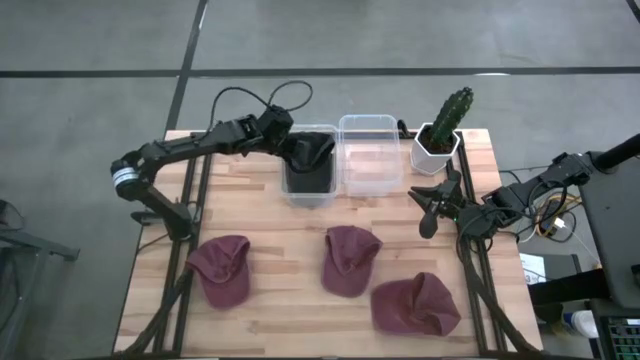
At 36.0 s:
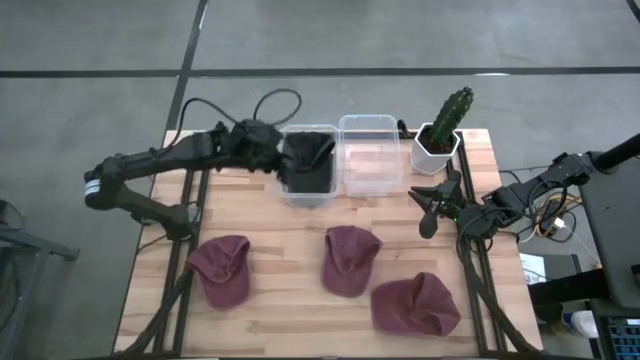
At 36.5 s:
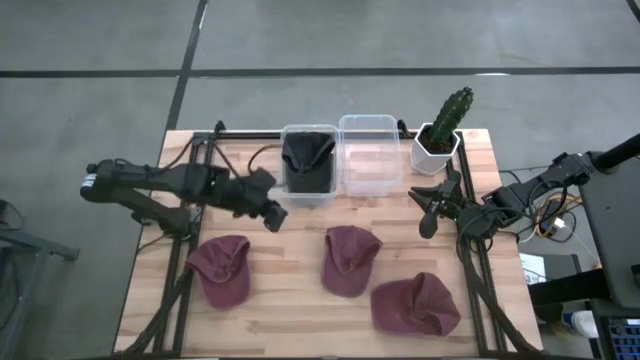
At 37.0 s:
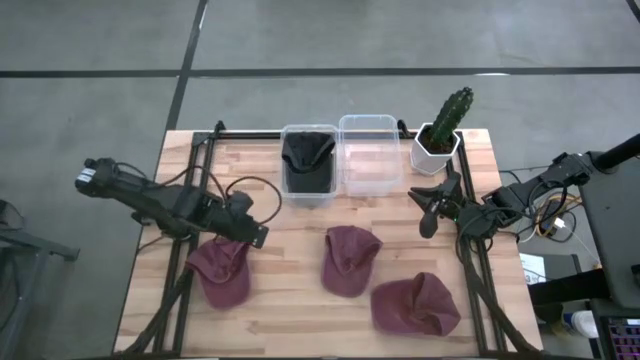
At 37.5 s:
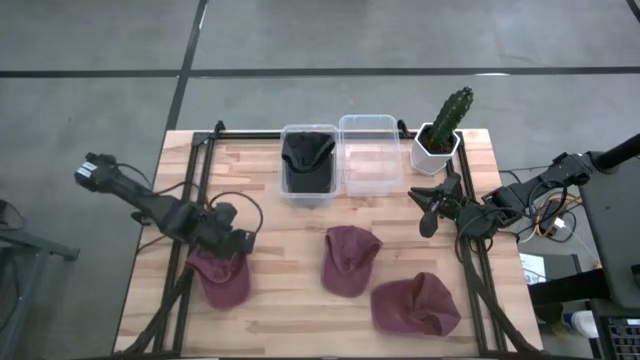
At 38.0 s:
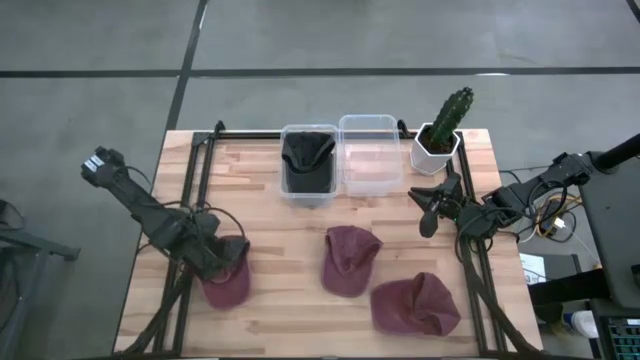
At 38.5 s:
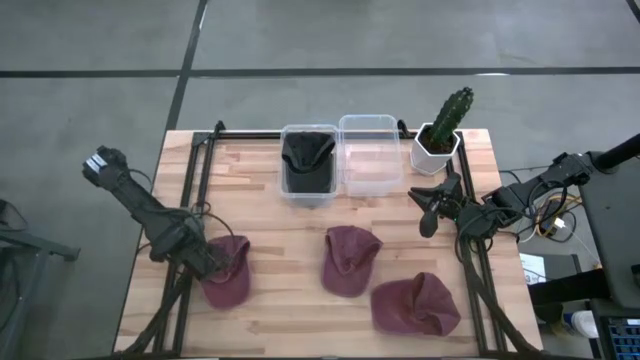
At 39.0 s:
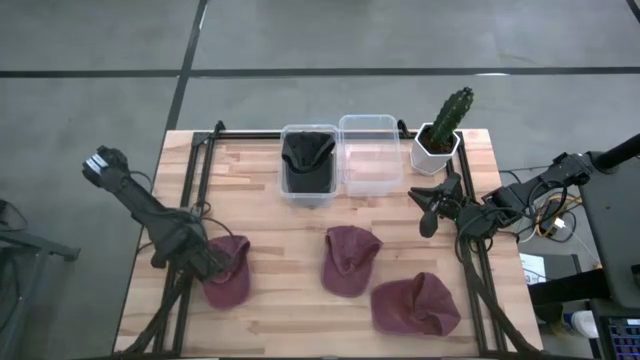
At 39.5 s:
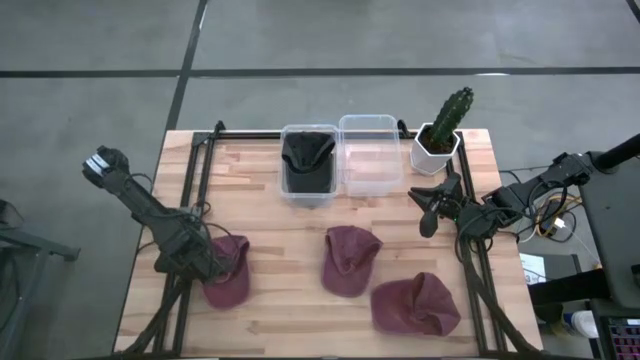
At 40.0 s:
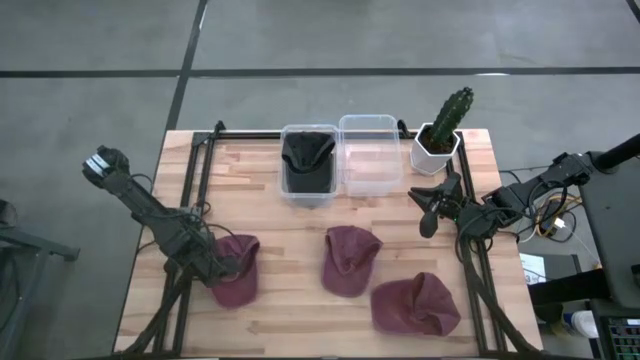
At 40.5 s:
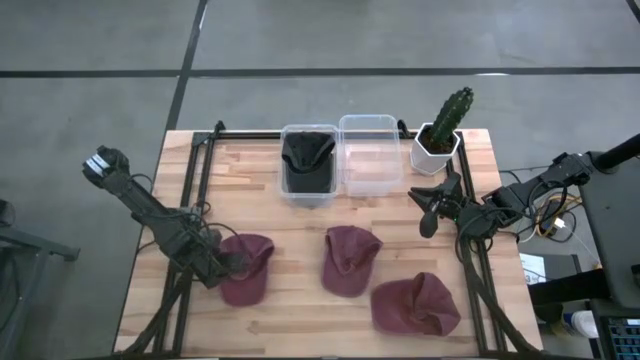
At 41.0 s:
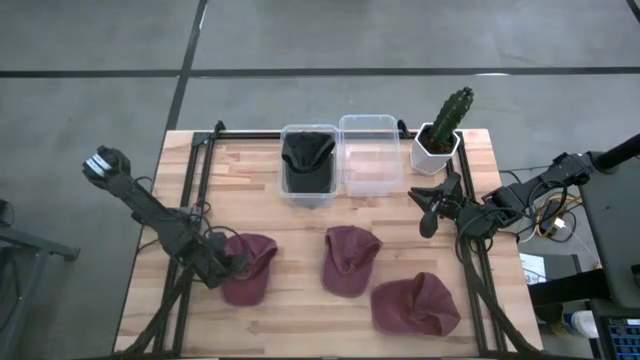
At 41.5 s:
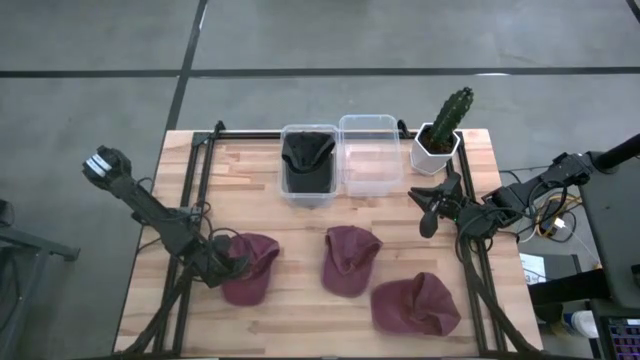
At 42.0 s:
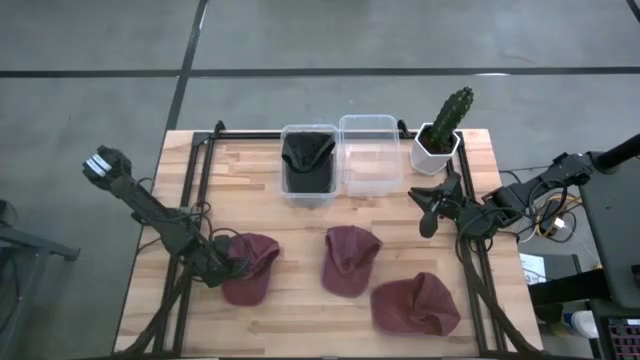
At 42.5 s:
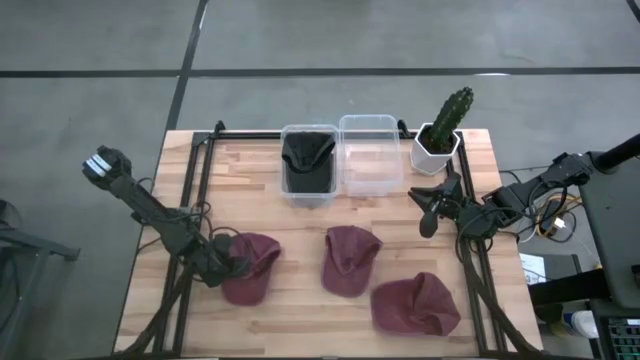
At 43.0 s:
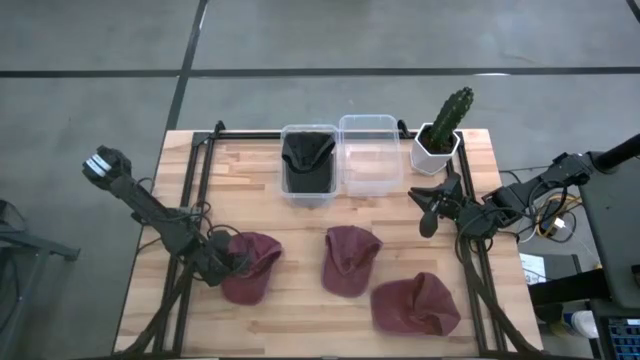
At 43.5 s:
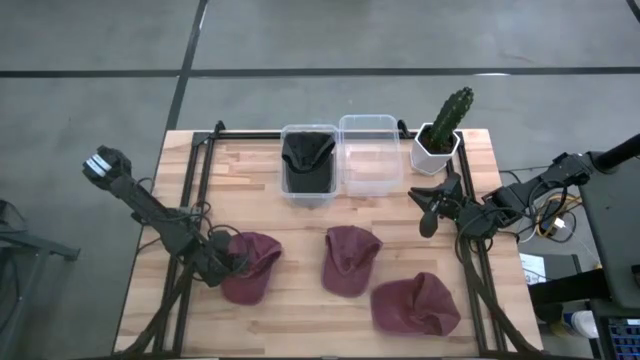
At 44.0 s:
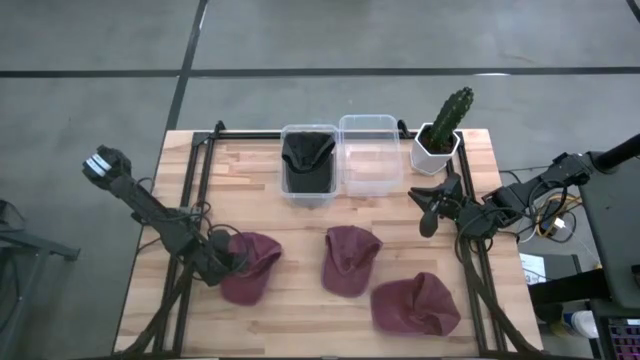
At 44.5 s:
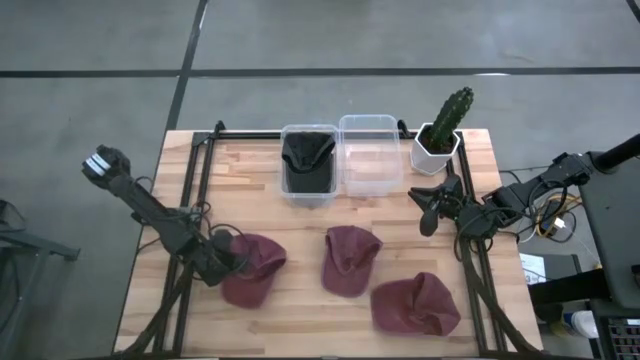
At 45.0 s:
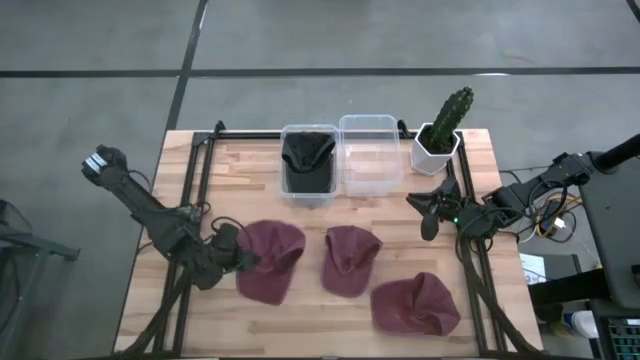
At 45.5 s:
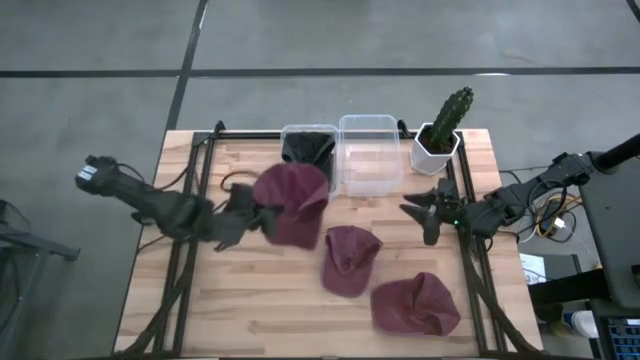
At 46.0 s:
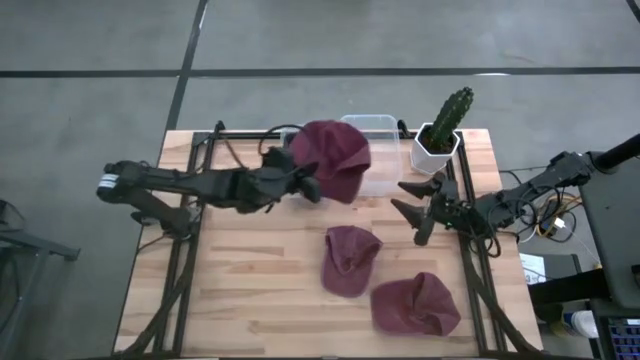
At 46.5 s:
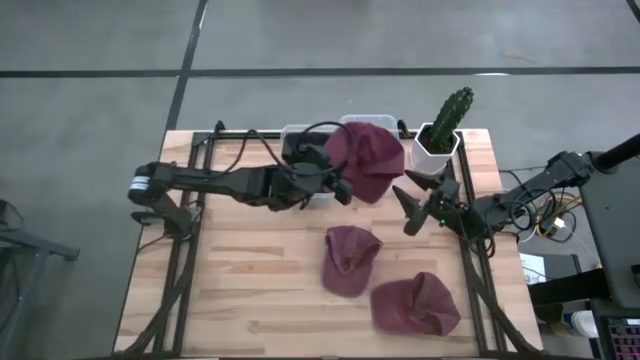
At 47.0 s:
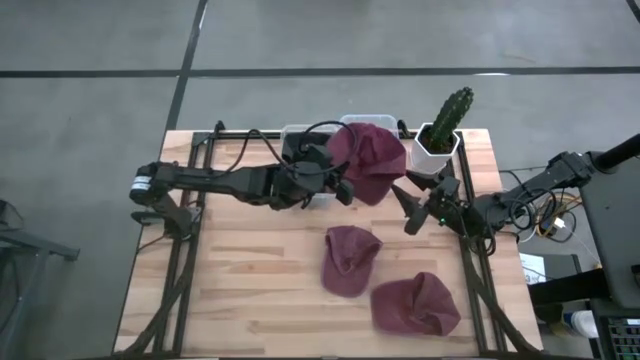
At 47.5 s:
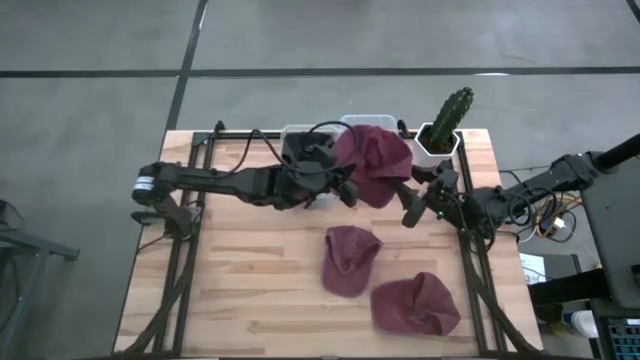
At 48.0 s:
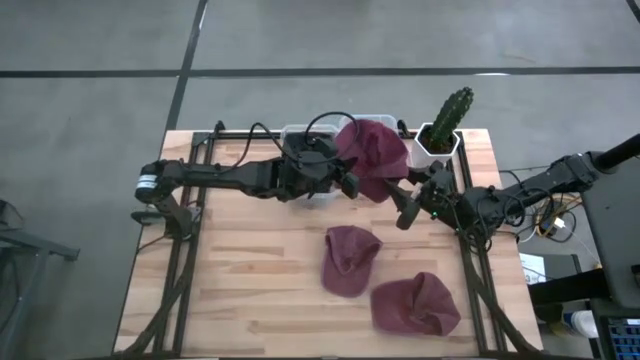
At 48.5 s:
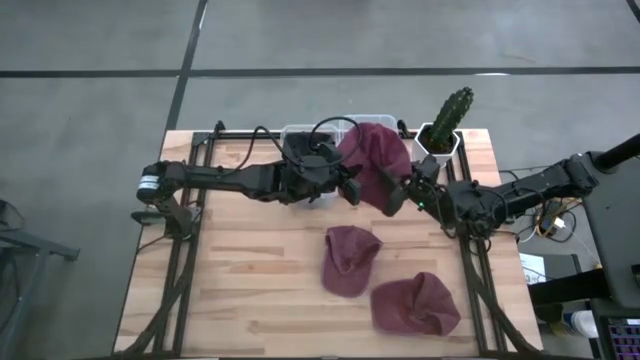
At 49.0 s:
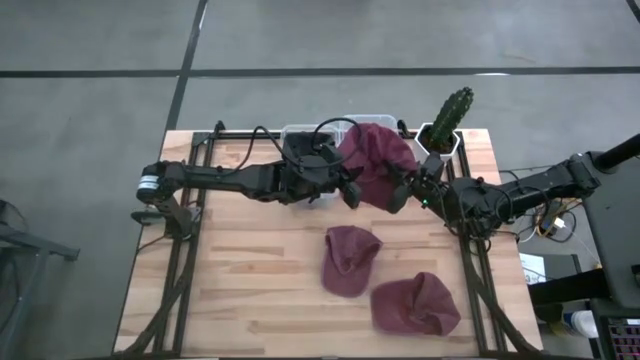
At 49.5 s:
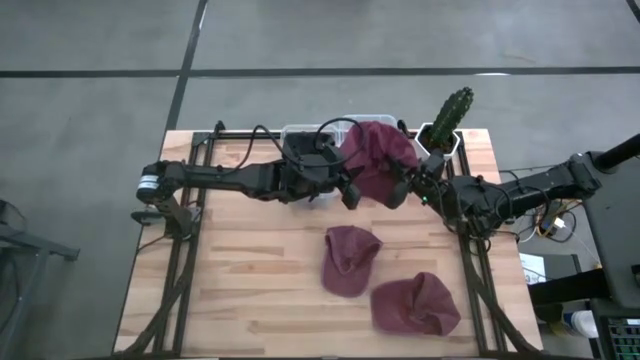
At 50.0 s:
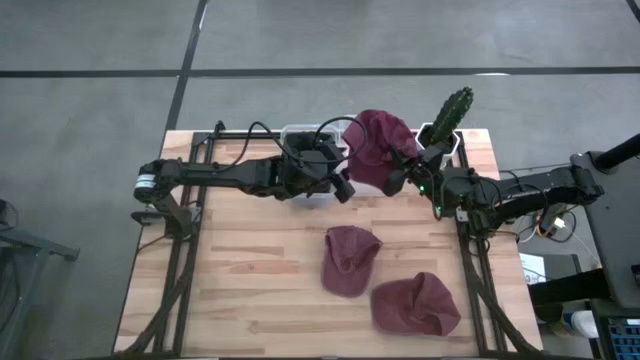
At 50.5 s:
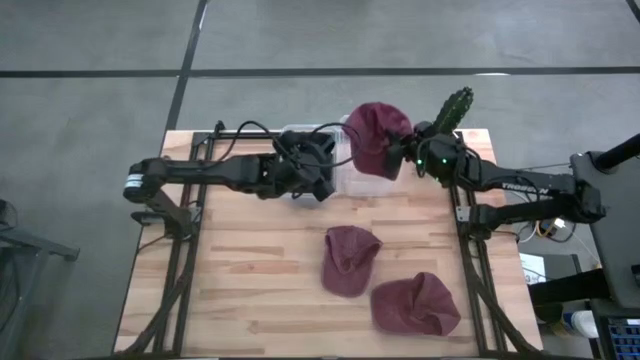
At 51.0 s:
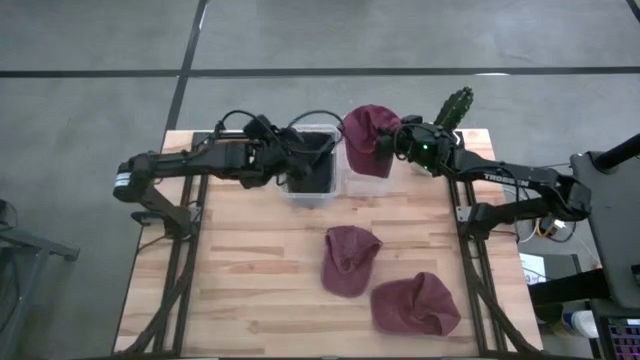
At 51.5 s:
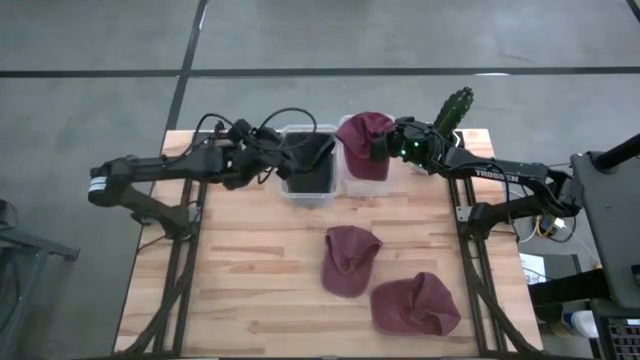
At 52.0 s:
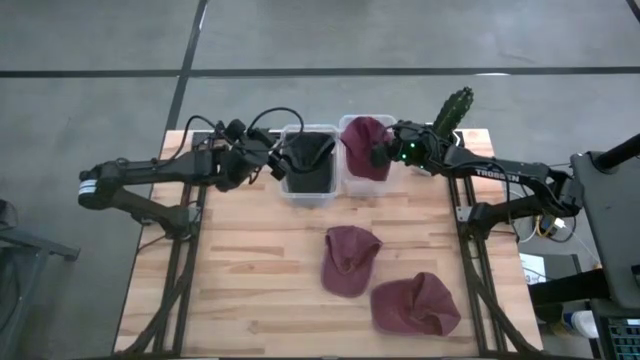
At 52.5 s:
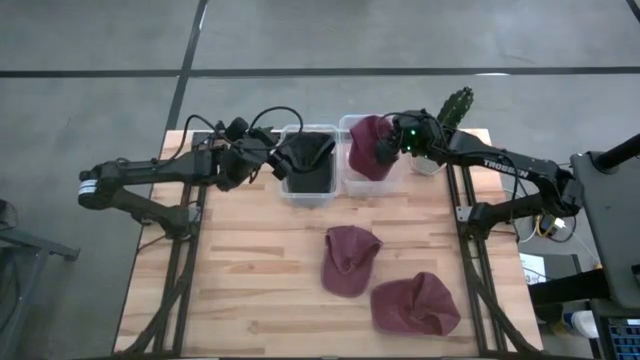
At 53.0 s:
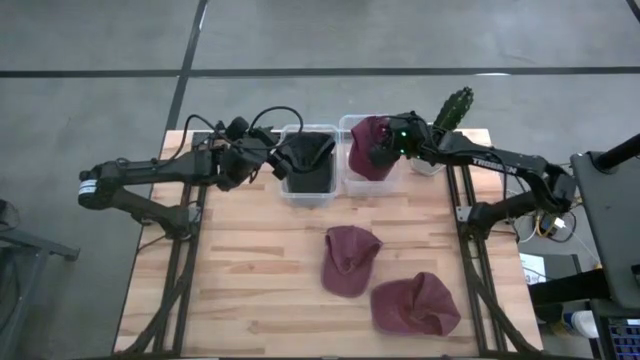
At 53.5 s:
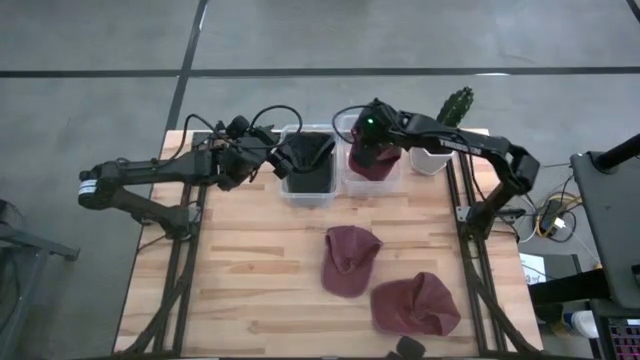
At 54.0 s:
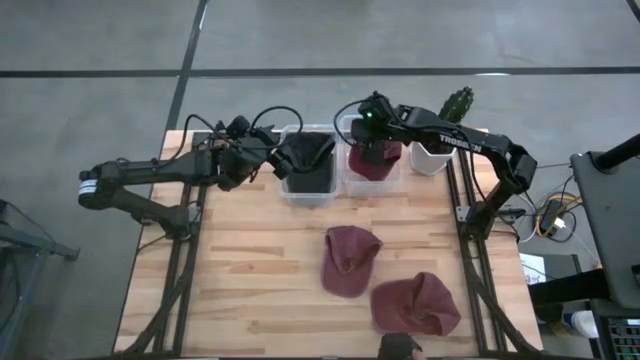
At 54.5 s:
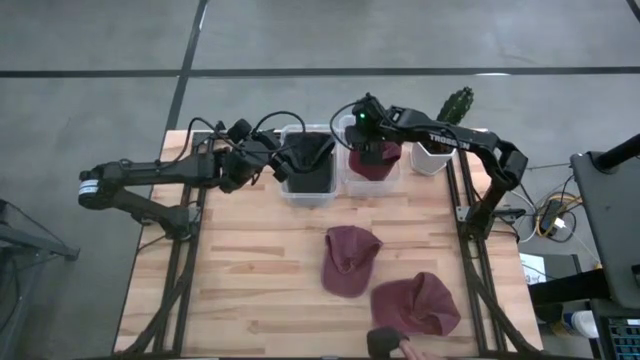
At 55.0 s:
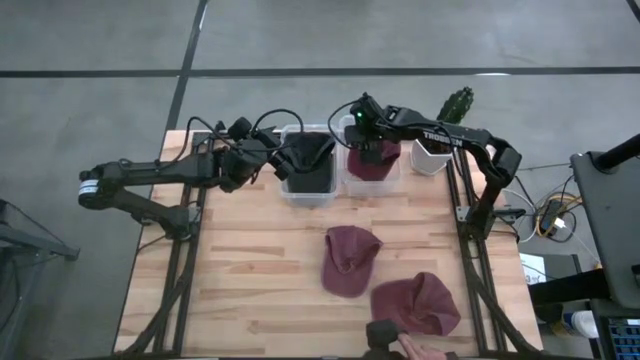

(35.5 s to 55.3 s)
Task: Pick & Place hat
Put the left red cap into the right transparent bin

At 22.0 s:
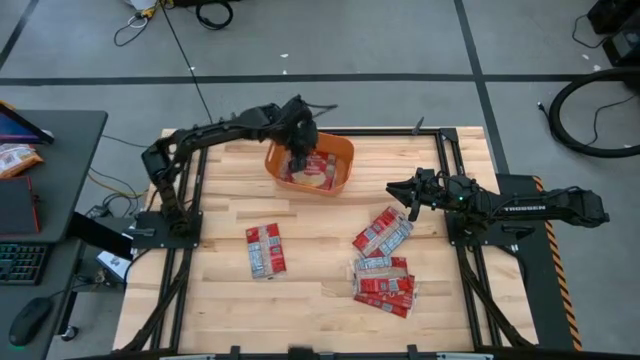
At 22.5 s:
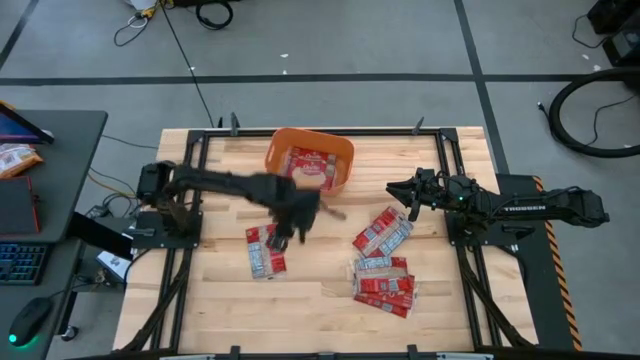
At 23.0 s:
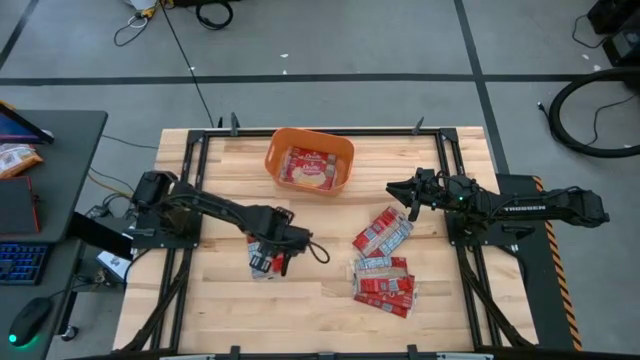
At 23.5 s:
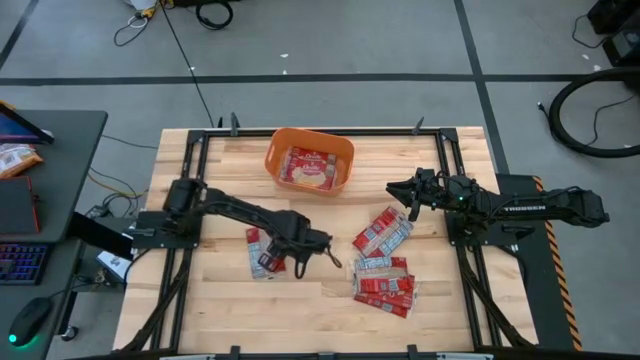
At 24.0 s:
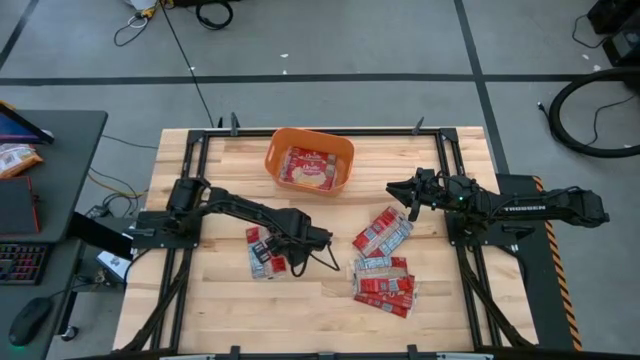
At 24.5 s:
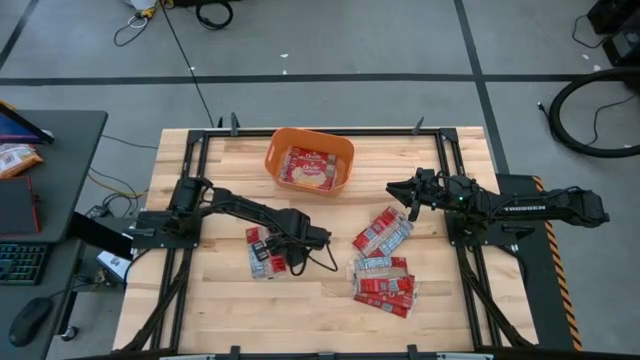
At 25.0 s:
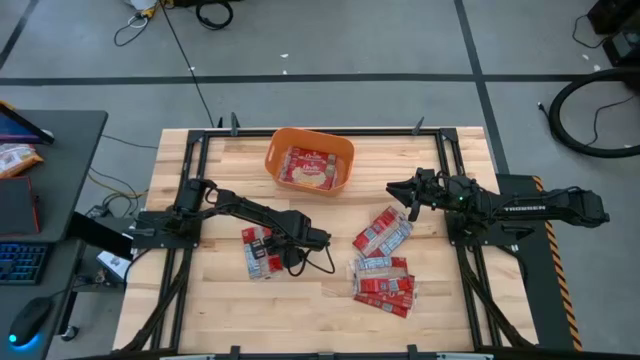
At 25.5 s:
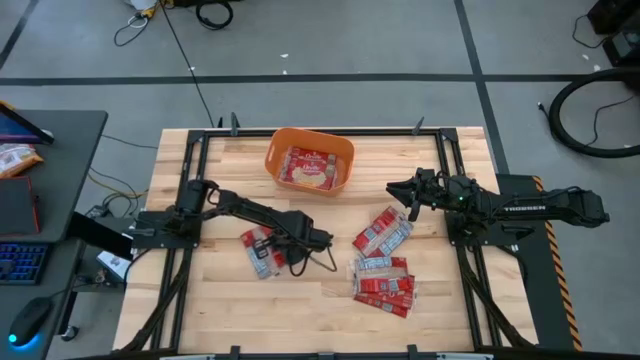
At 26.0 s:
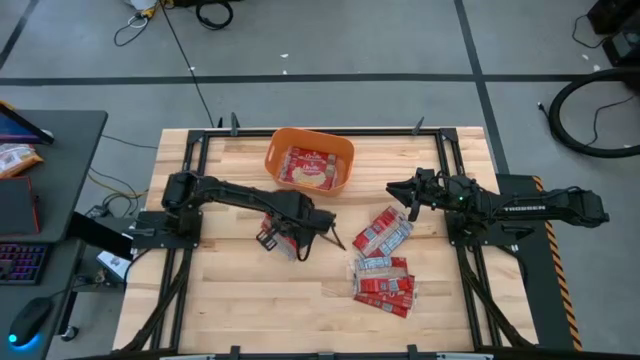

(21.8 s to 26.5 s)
Task: Sort popcorn bags into baskets
Put the red popcorn bag into the orange bin
